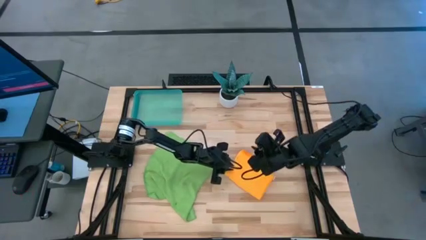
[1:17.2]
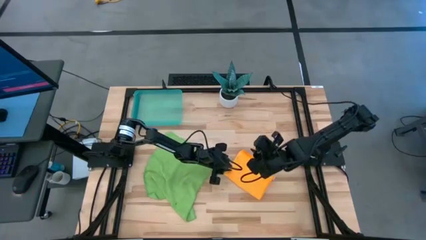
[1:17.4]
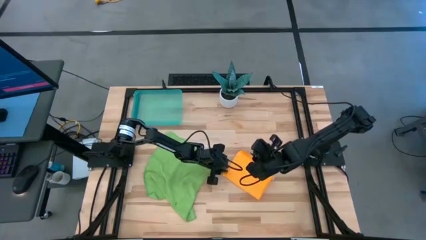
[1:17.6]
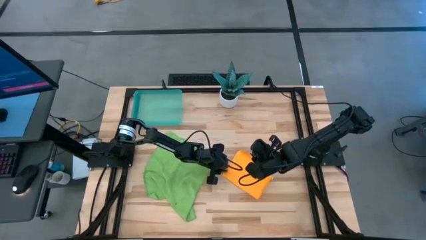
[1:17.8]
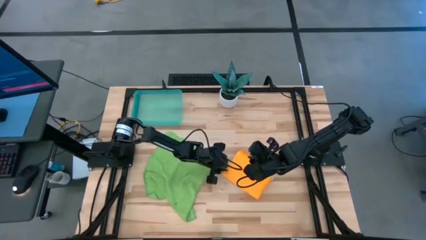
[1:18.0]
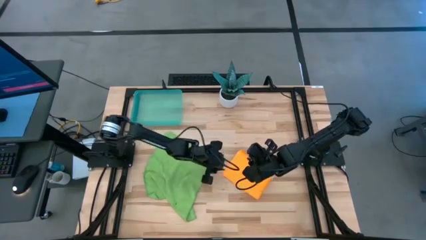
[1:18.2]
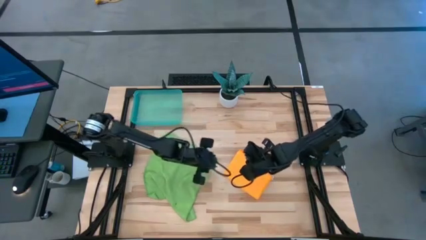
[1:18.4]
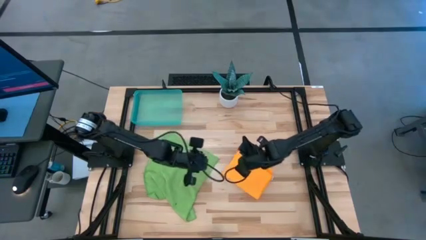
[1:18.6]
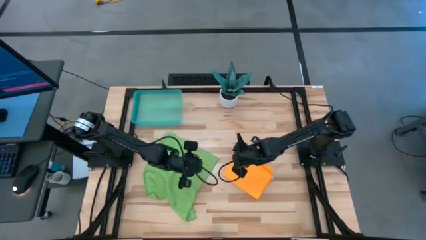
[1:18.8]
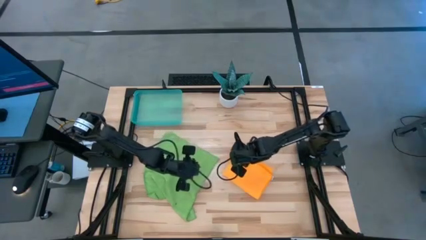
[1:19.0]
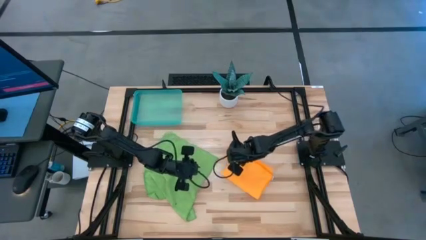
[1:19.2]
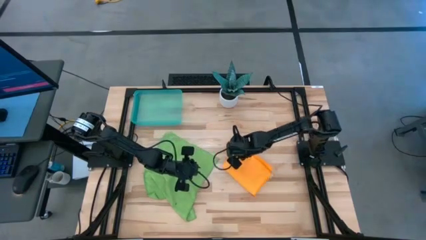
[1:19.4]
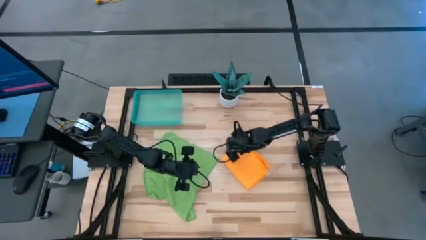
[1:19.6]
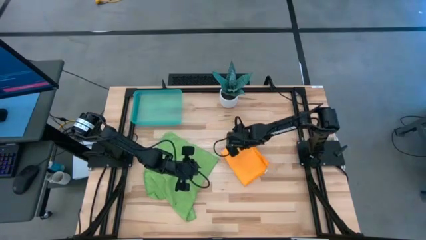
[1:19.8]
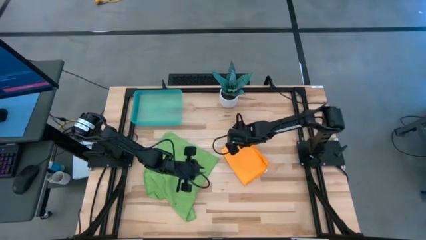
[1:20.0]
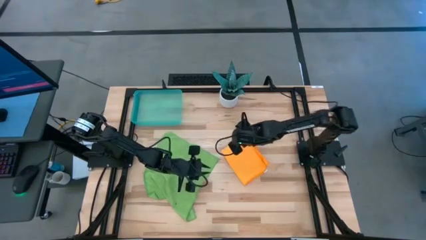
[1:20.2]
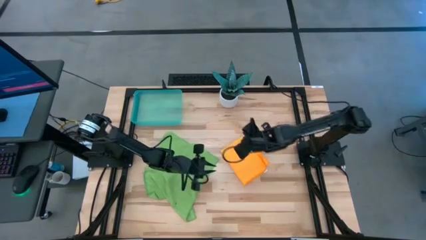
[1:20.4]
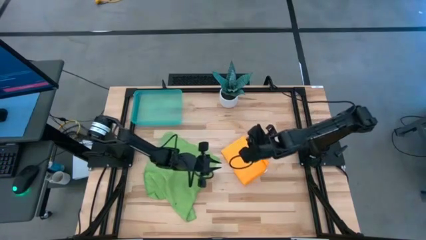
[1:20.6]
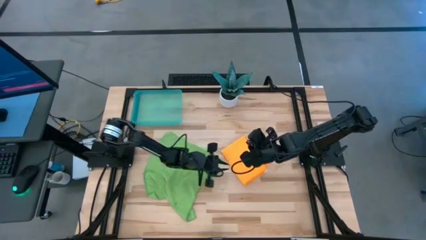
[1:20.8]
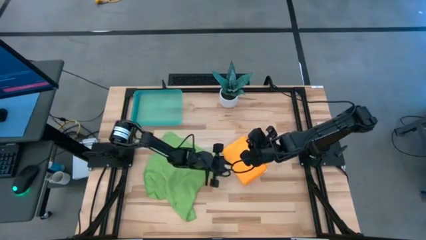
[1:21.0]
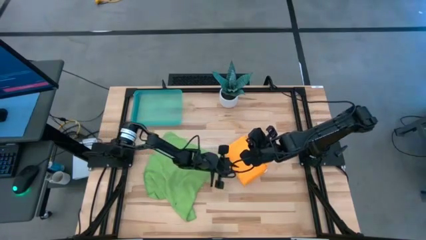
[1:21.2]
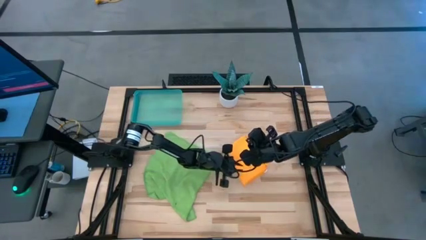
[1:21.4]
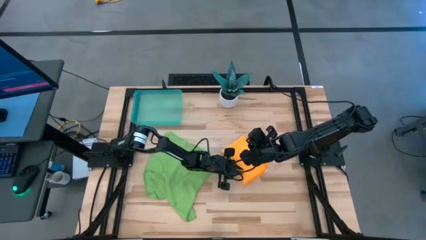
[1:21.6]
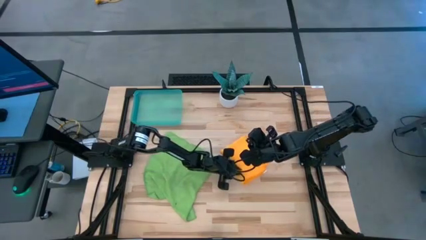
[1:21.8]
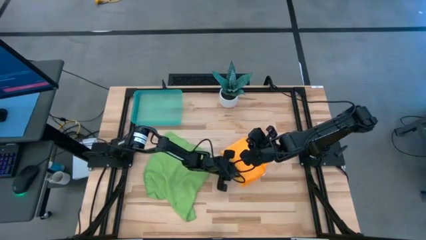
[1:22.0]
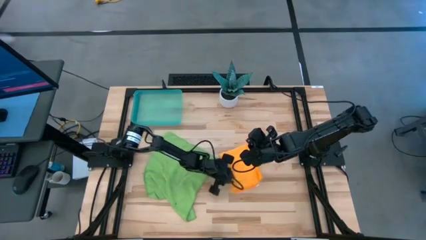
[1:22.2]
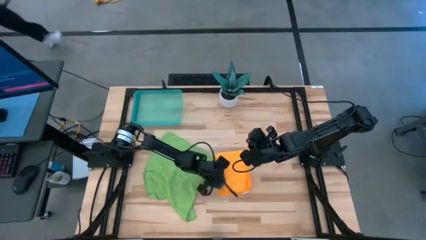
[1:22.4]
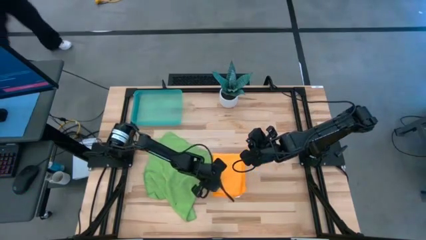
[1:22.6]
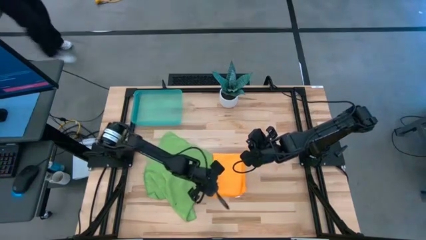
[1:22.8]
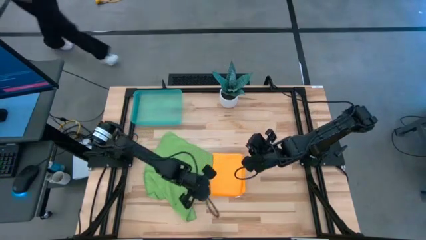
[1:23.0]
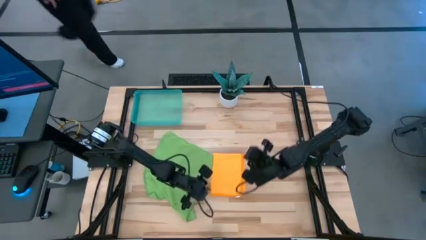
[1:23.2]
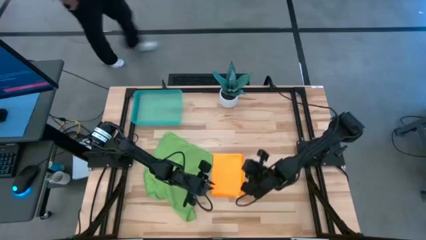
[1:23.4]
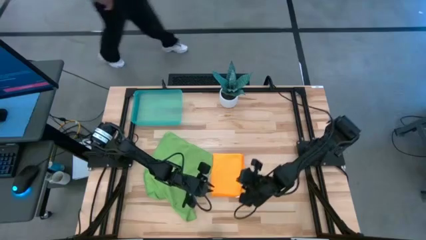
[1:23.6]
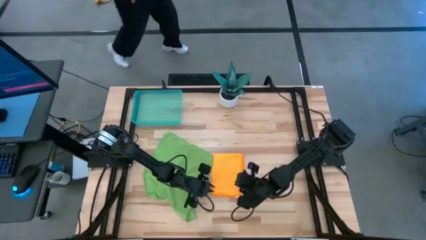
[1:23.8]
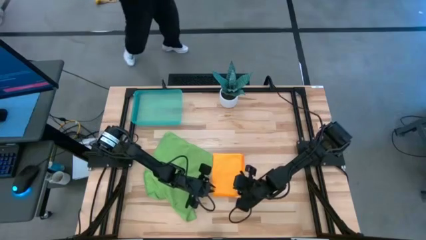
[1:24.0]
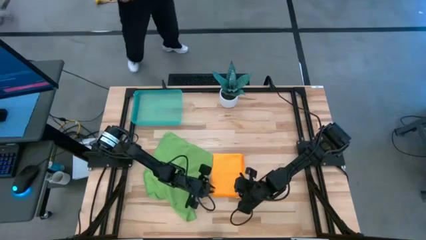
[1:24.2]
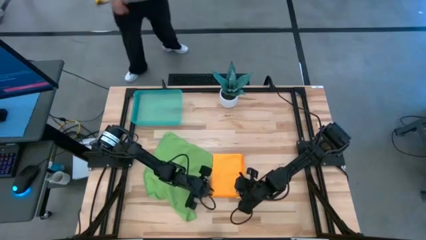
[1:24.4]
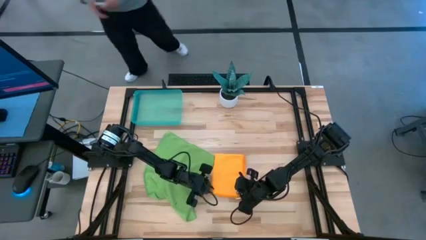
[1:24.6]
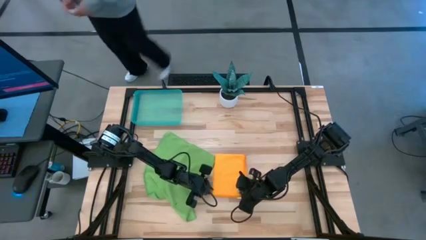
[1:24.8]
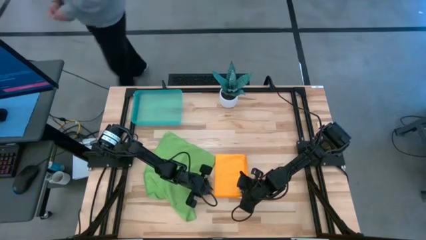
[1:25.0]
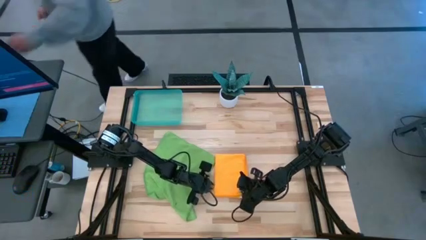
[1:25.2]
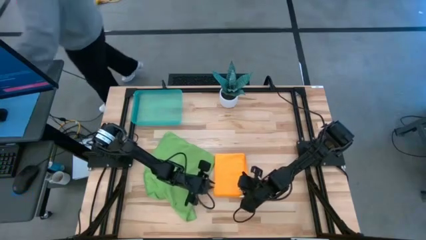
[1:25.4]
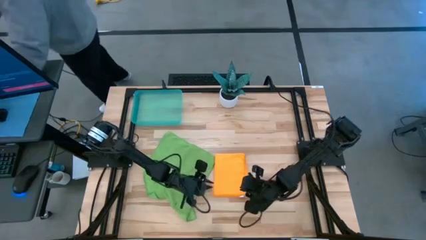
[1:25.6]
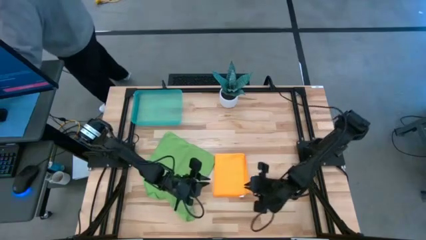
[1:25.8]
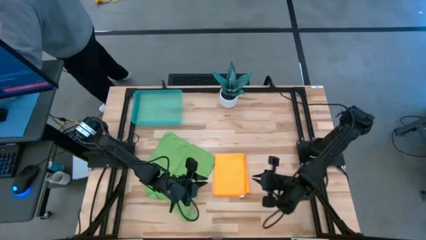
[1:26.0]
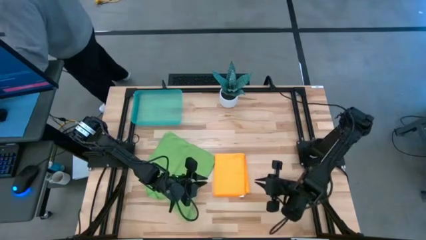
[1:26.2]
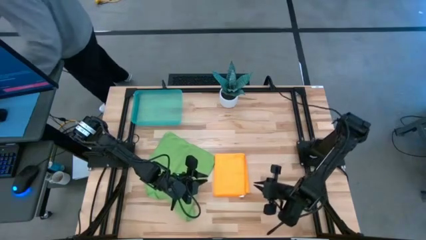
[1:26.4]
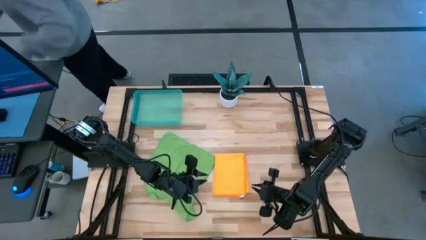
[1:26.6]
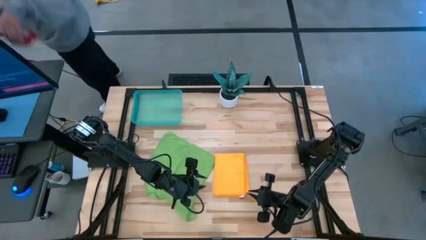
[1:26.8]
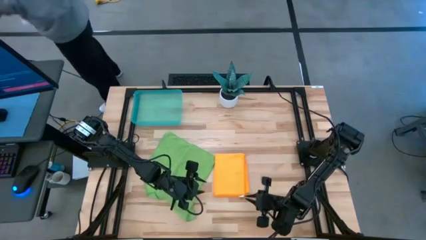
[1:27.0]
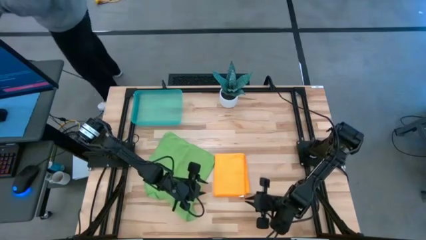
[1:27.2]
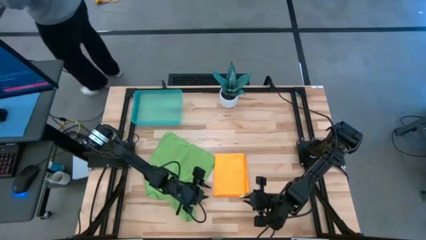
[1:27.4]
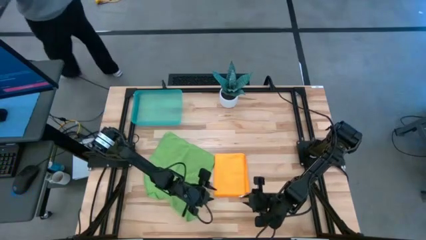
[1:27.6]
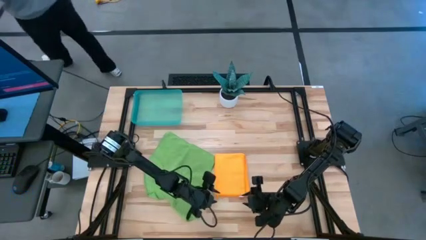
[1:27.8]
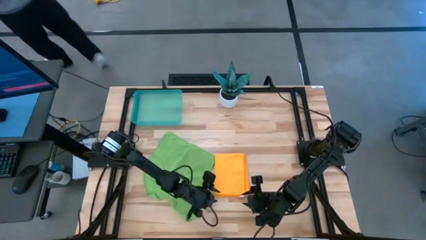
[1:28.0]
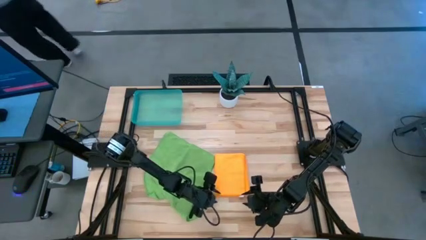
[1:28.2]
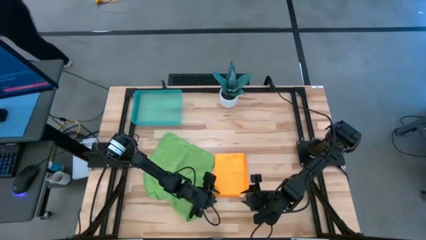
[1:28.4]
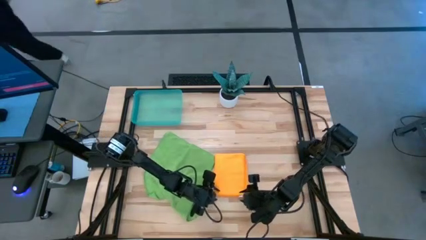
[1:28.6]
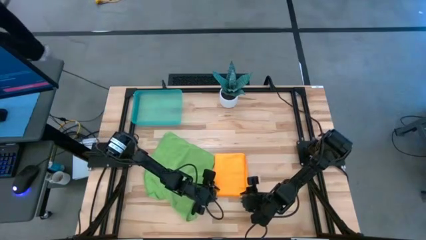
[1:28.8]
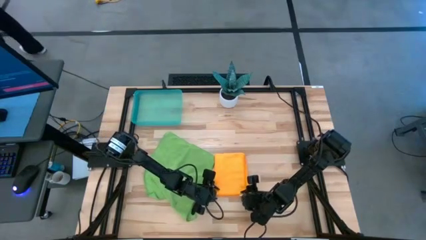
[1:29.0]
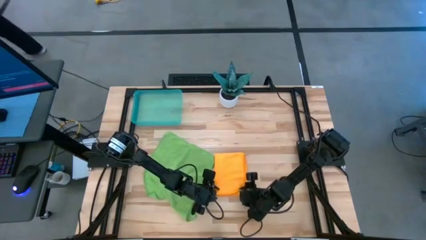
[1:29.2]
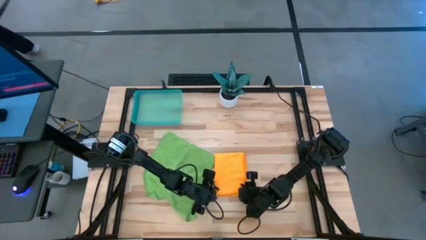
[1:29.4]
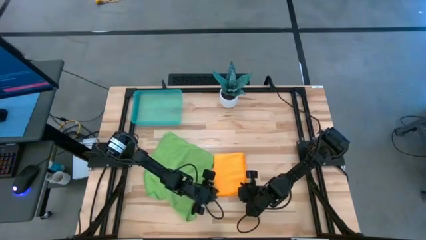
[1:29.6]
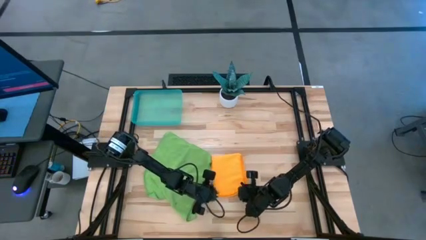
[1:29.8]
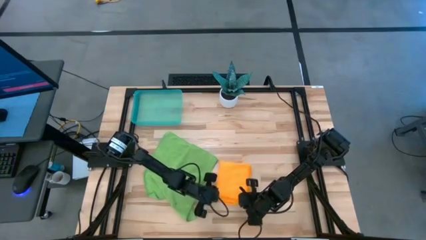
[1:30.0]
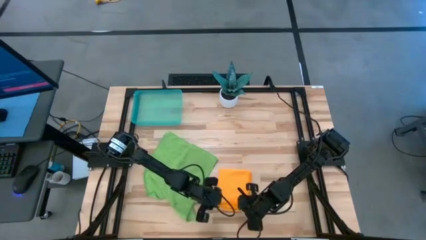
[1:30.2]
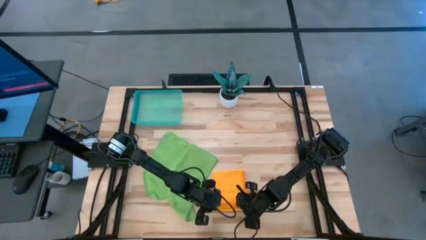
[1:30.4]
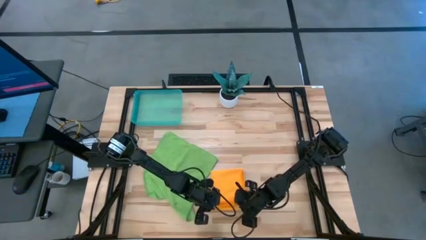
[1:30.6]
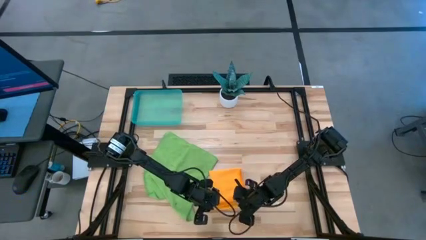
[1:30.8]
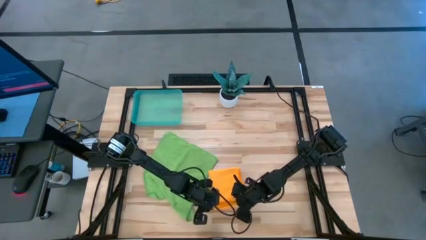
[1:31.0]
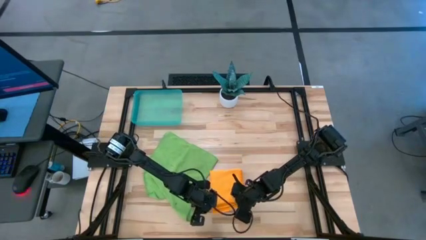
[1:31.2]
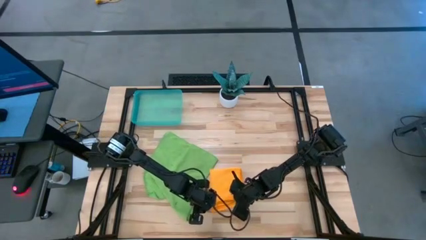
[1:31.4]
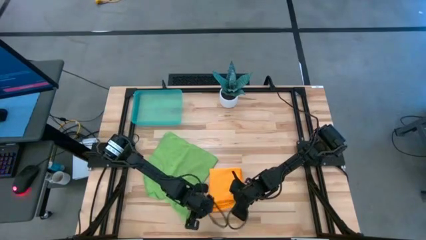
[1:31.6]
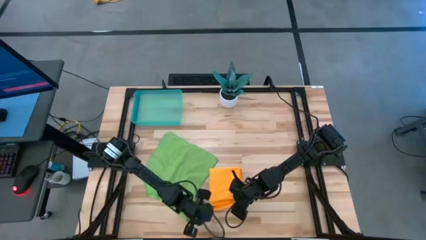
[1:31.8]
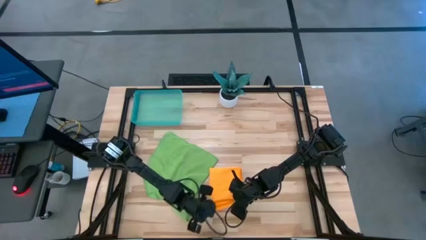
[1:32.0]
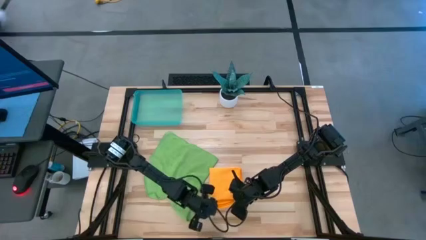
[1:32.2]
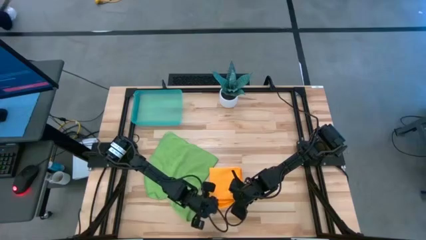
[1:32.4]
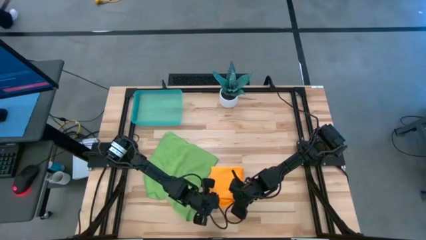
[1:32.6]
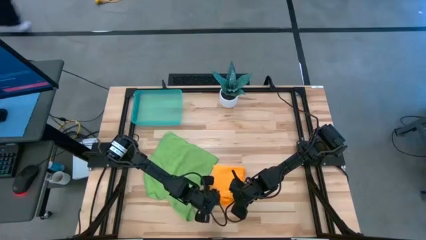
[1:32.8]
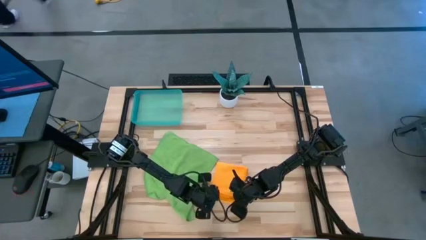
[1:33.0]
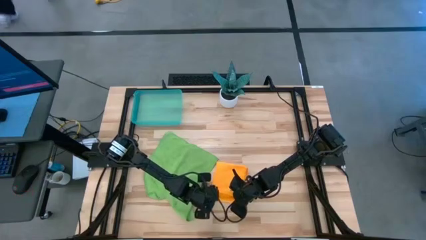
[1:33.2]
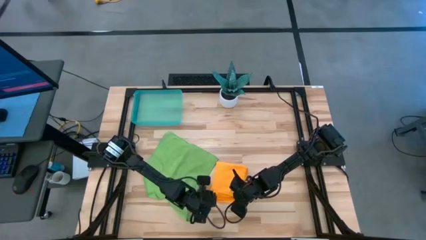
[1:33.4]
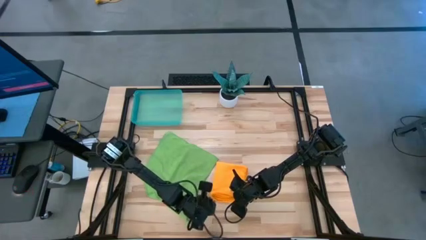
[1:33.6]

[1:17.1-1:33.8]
Task: Roll microfiber towels into tight, uniform cylinder then place into a basket
Roll the yellow microfiber cloth

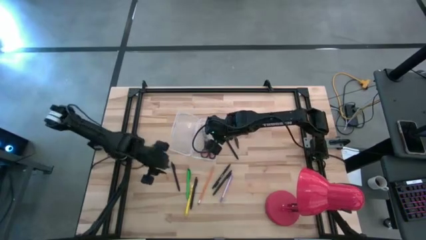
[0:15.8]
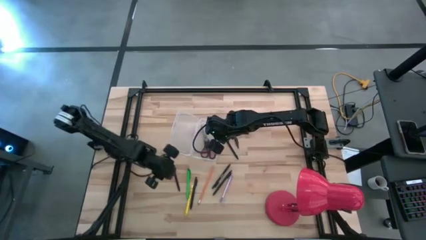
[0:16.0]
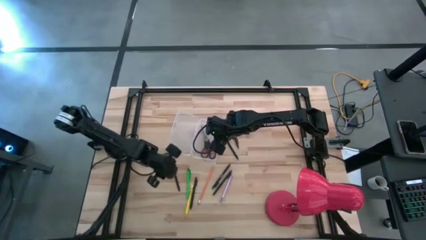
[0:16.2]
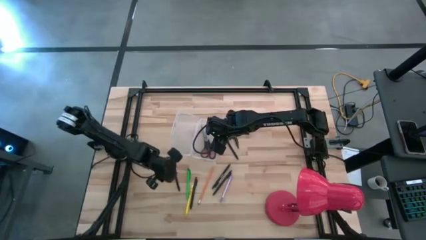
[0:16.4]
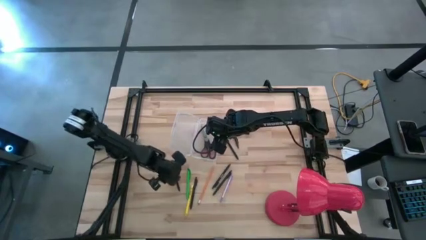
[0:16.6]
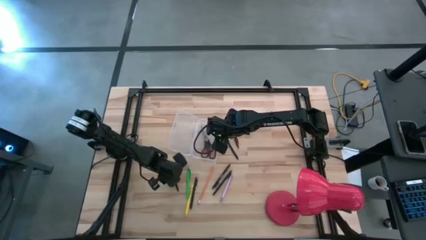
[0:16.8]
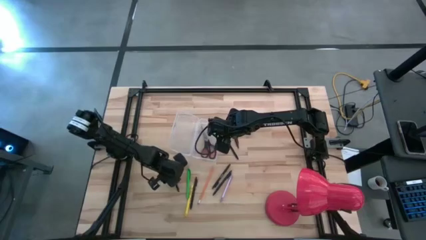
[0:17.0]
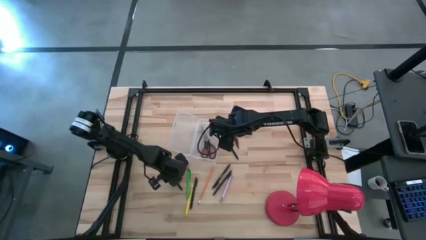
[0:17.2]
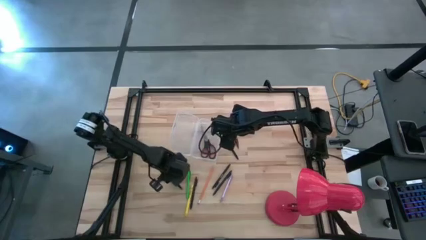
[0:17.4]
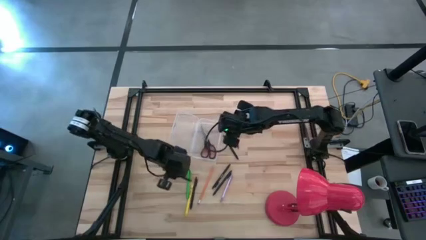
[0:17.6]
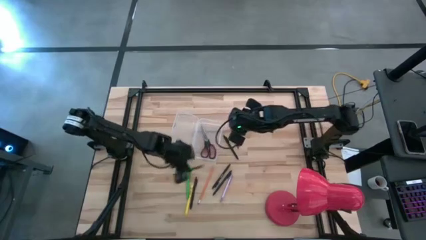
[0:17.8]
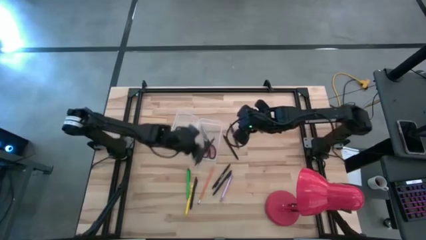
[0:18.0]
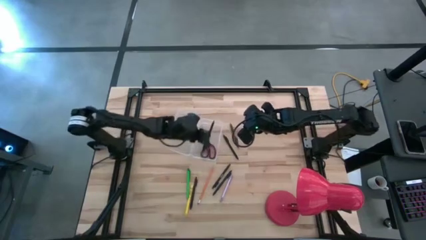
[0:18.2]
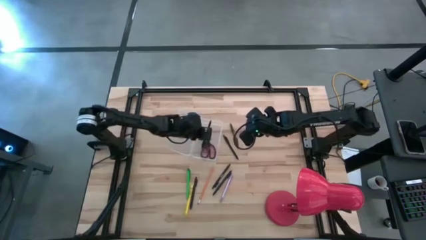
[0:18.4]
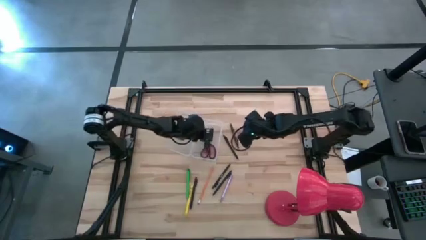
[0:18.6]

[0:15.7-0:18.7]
Task: Pick & place school supplies into a supply box
Put the black pen into the transparent supply box
